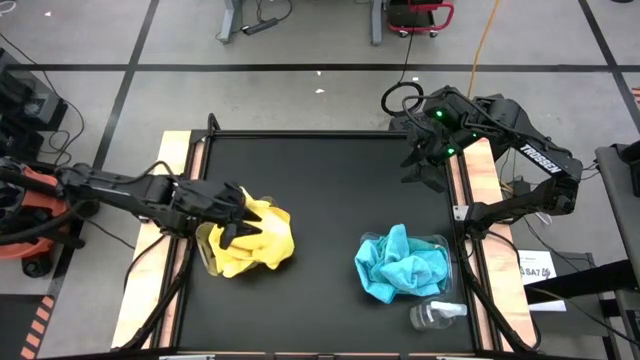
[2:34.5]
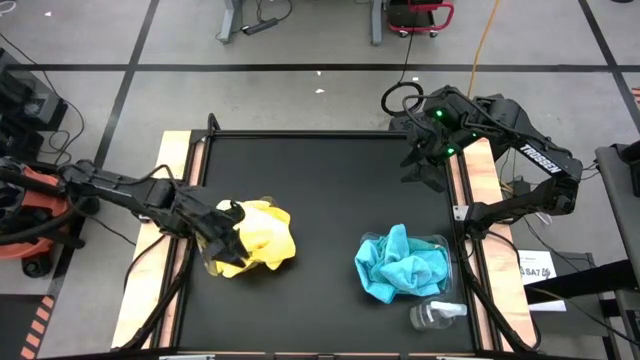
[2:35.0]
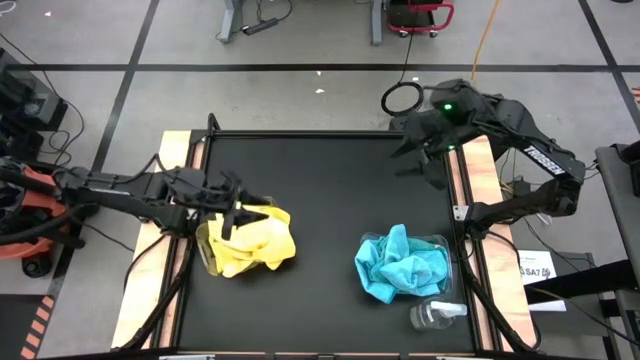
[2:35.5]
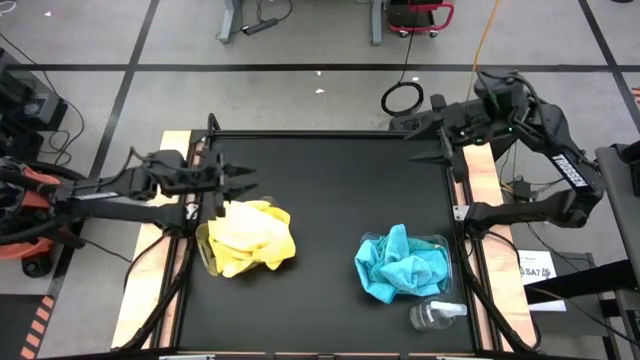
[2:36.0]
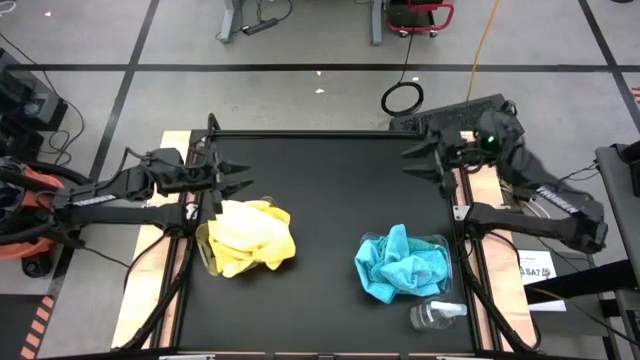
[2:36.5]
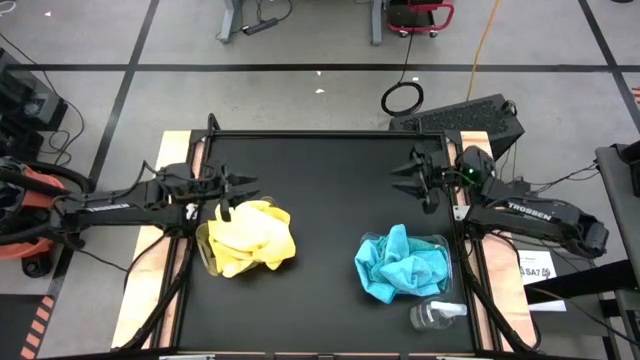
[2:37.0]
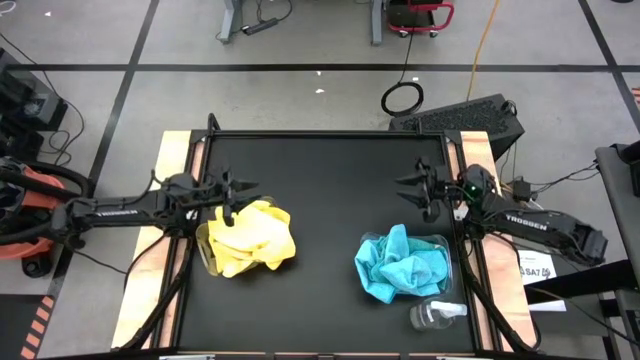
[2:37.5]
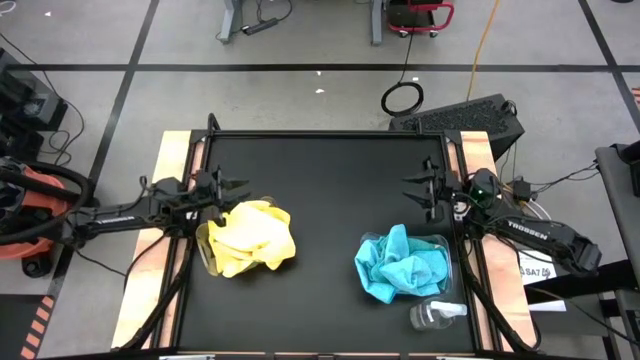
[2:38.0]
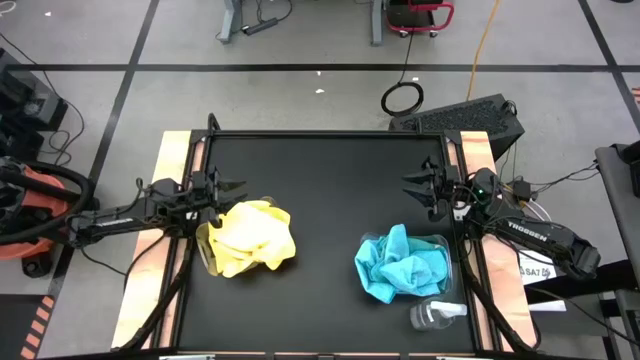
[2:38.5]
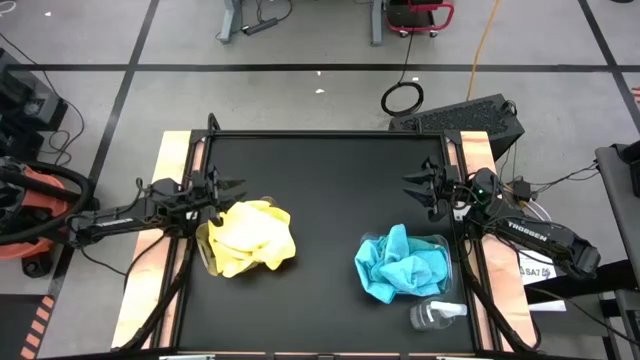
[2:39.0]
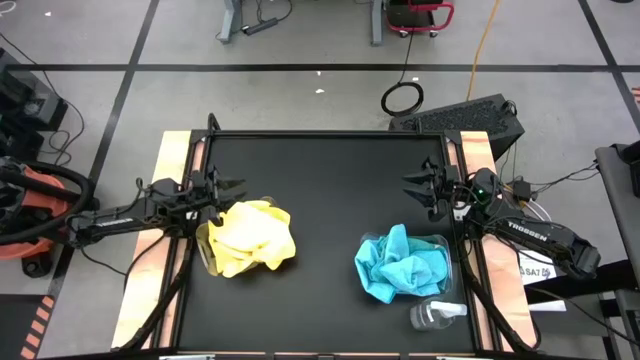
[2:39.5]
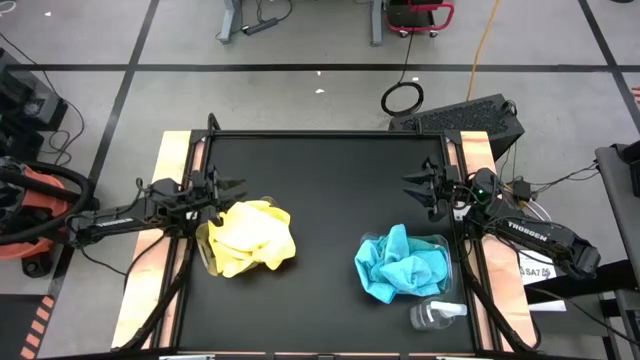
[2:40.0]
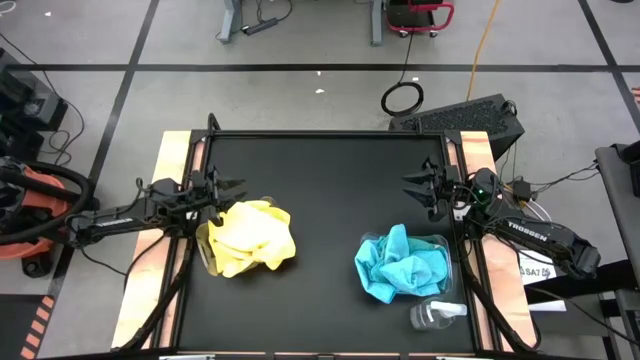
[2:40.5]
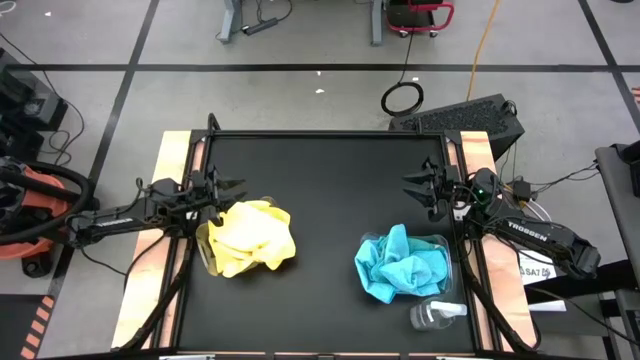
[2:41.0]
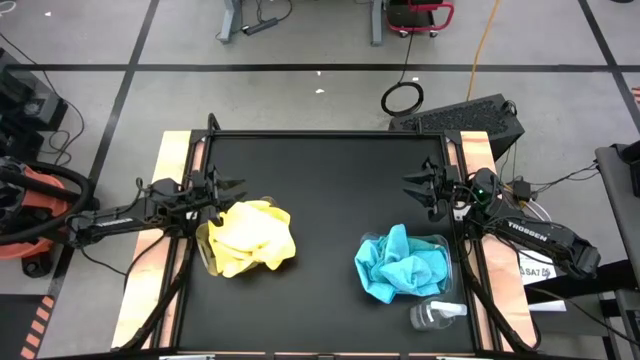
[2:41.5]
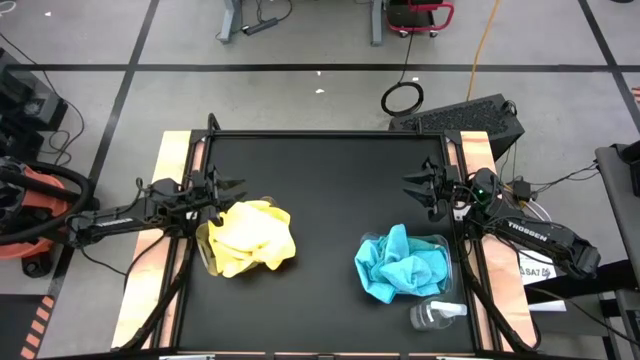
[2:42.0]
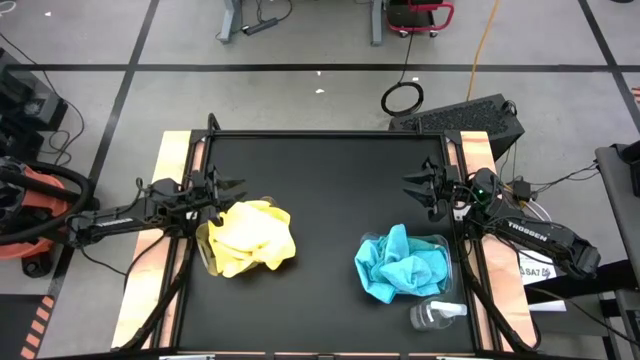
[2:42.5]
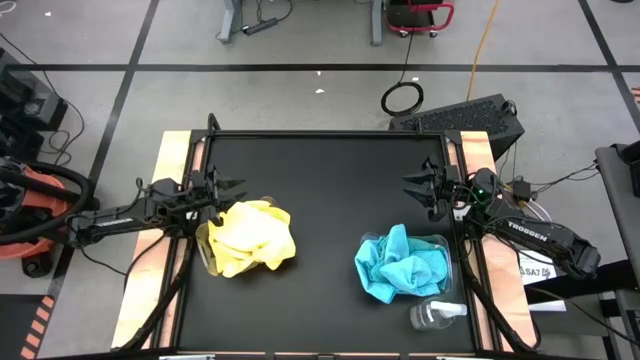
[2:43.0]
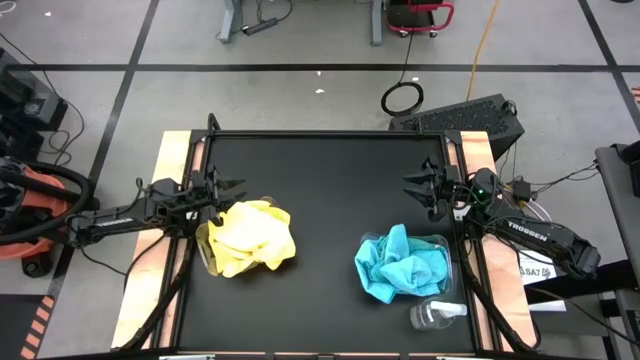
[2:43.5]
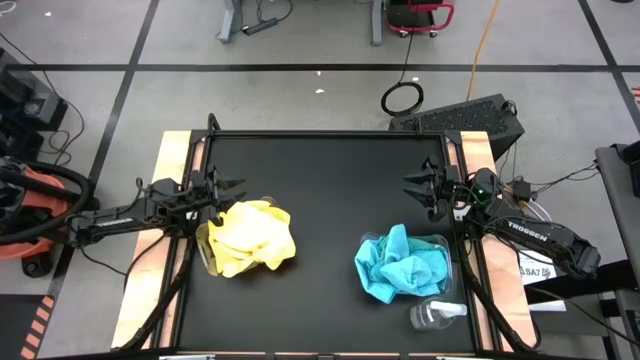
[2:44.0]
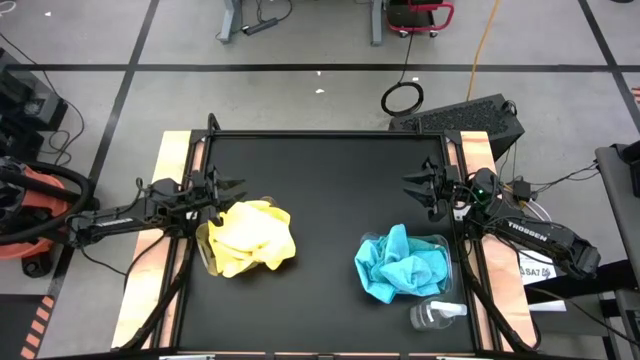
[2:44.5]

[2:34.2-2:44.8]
Task: Sort microfiber towel by color & place in baskets
Return to Home Position

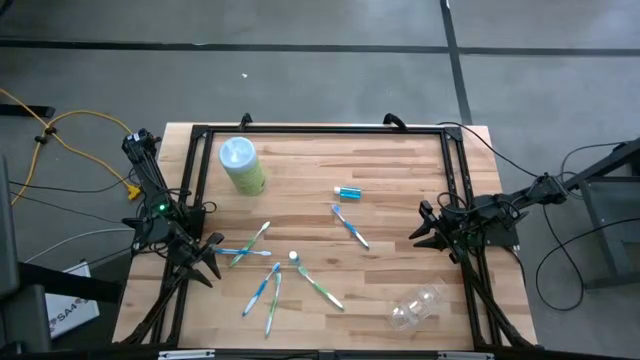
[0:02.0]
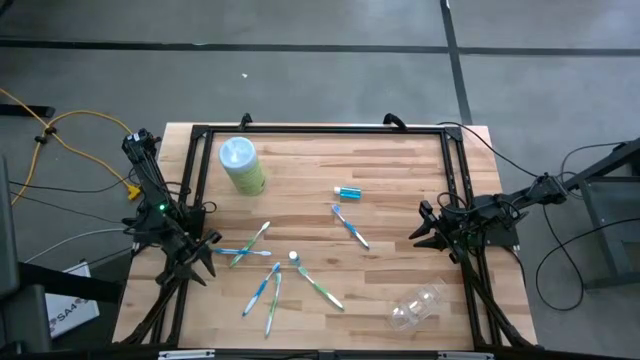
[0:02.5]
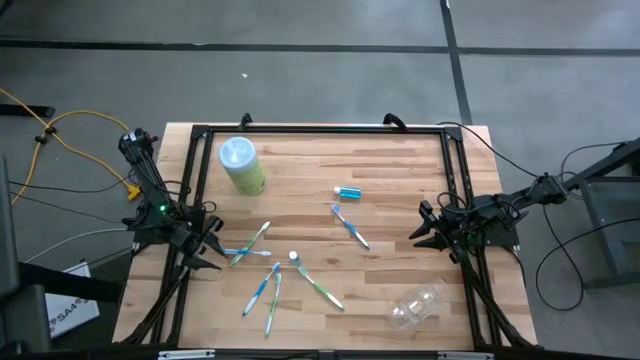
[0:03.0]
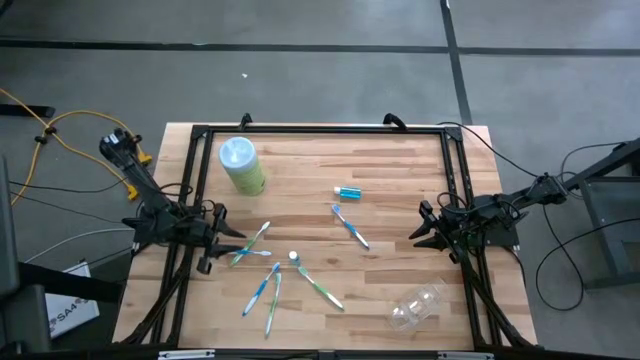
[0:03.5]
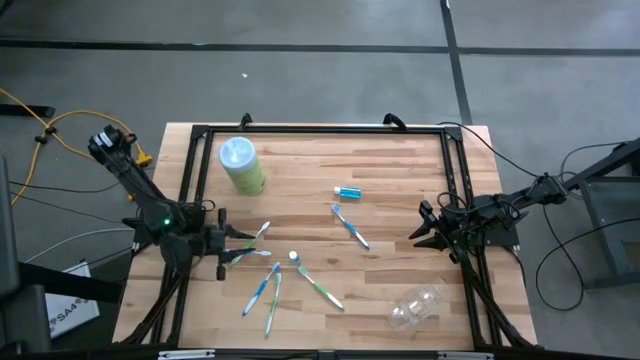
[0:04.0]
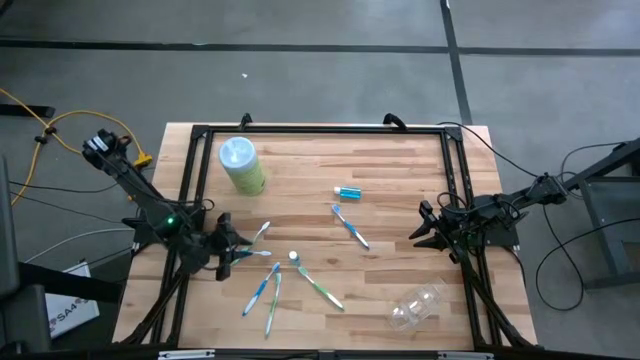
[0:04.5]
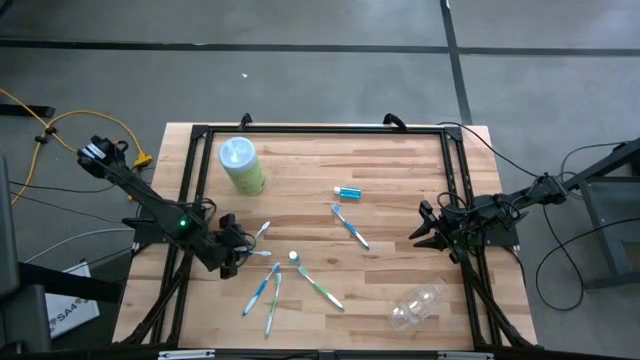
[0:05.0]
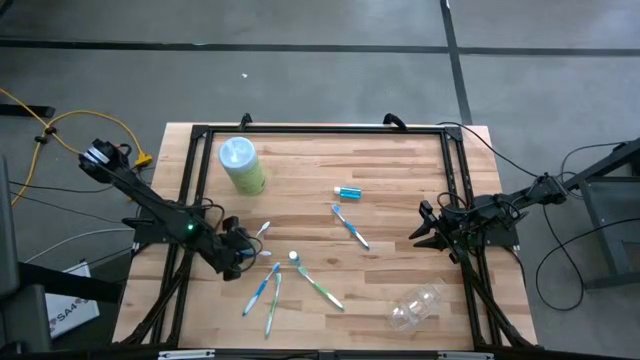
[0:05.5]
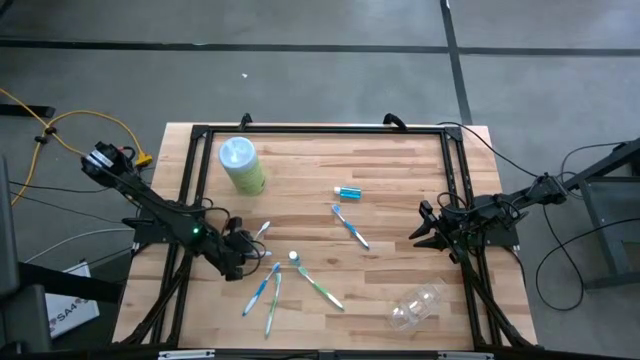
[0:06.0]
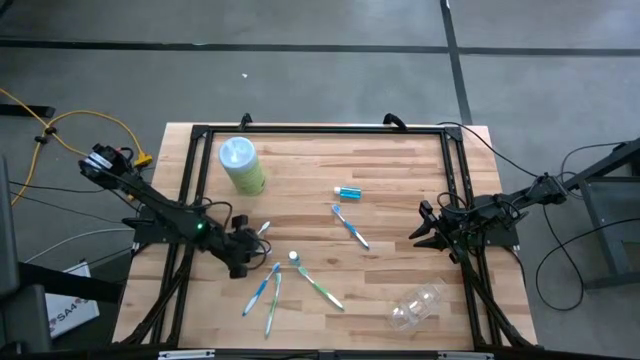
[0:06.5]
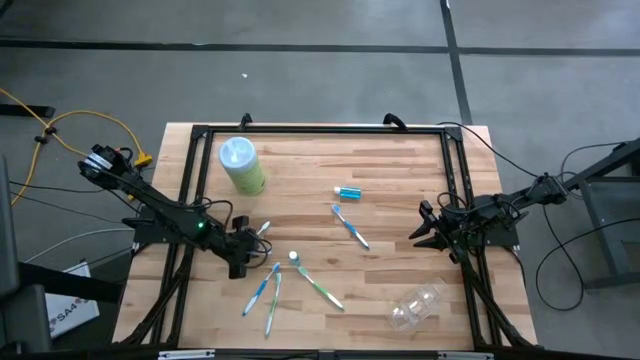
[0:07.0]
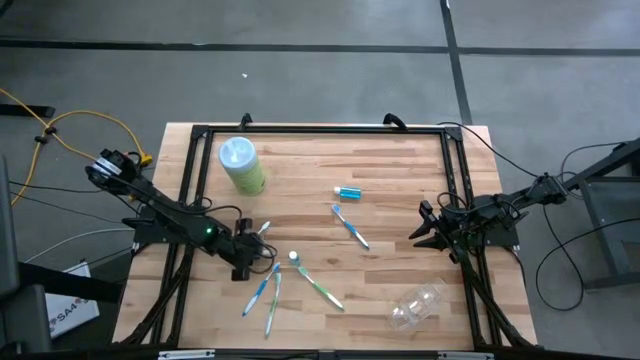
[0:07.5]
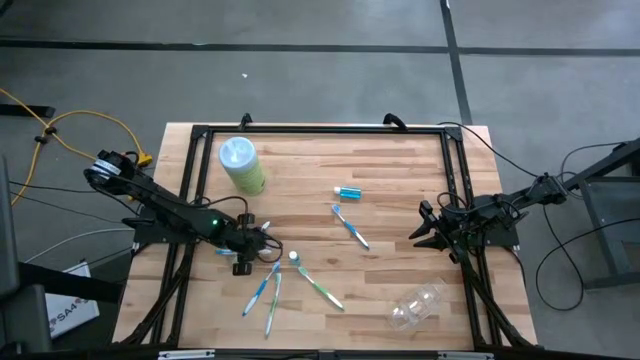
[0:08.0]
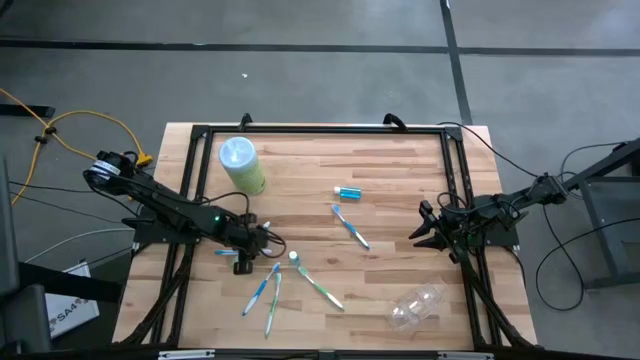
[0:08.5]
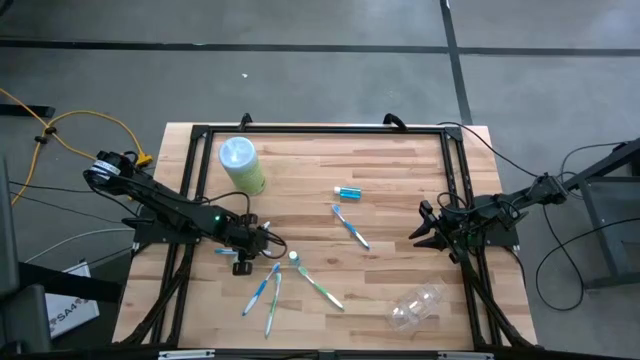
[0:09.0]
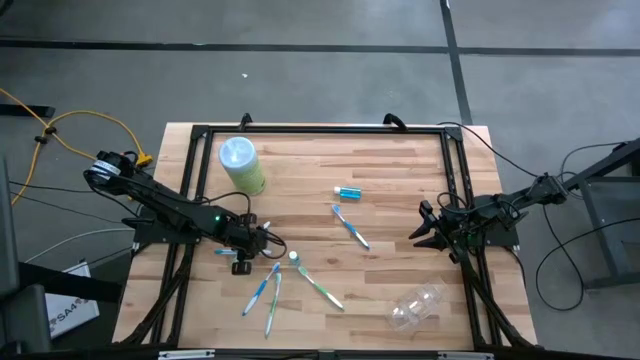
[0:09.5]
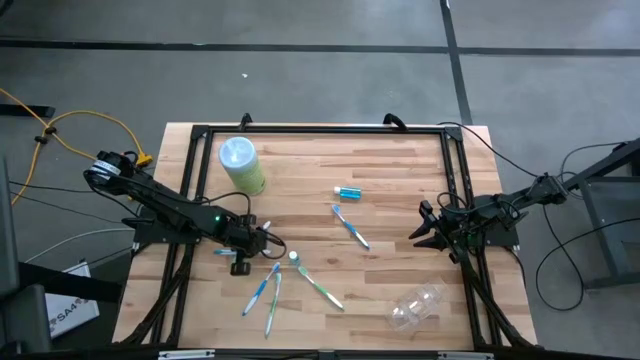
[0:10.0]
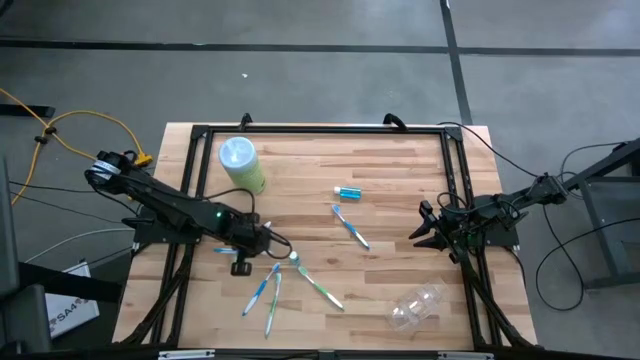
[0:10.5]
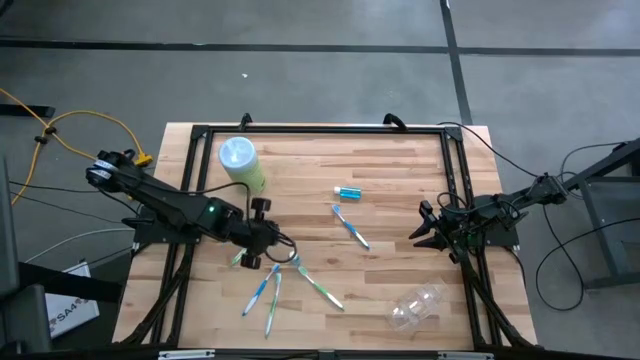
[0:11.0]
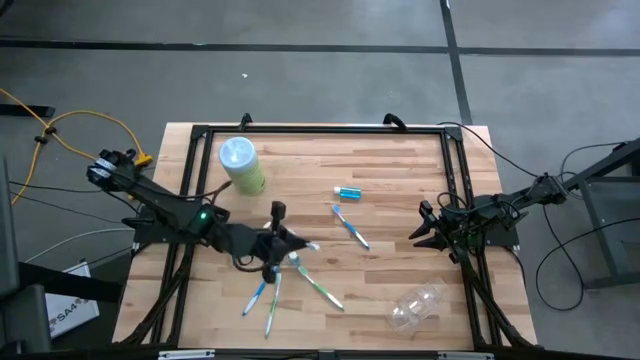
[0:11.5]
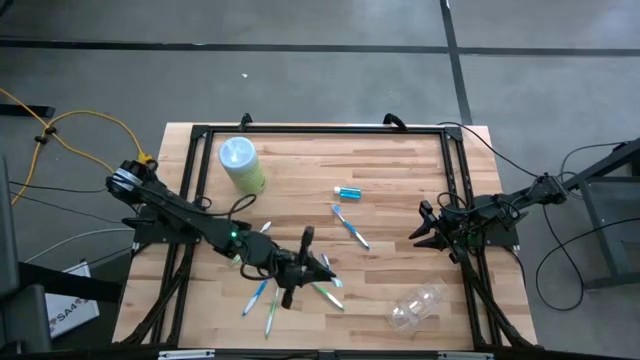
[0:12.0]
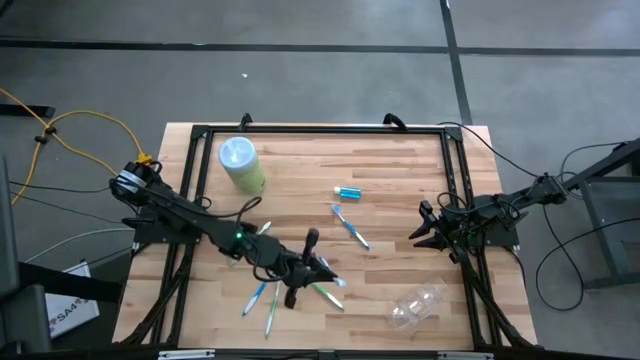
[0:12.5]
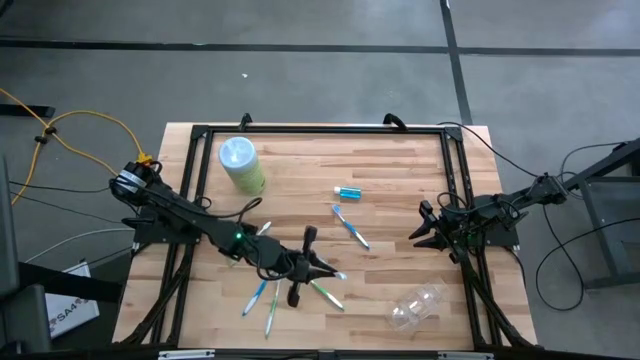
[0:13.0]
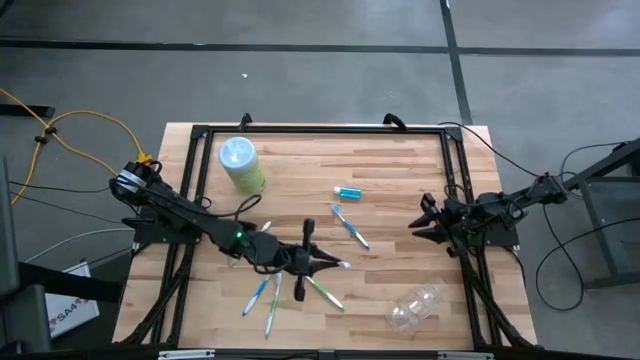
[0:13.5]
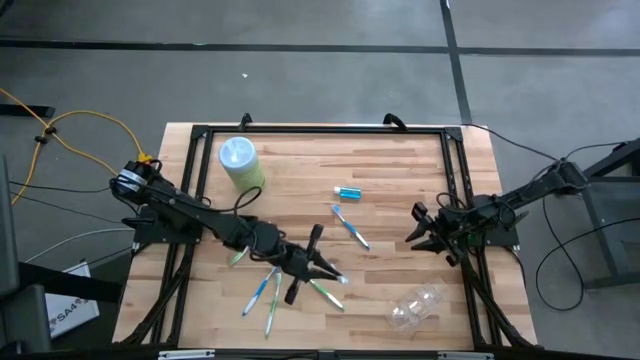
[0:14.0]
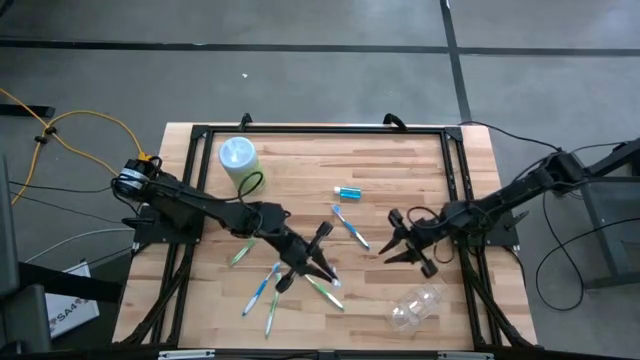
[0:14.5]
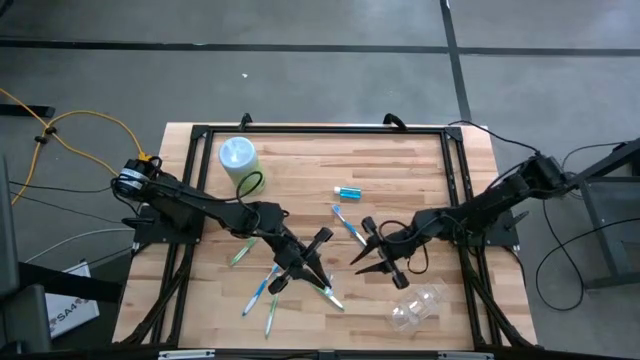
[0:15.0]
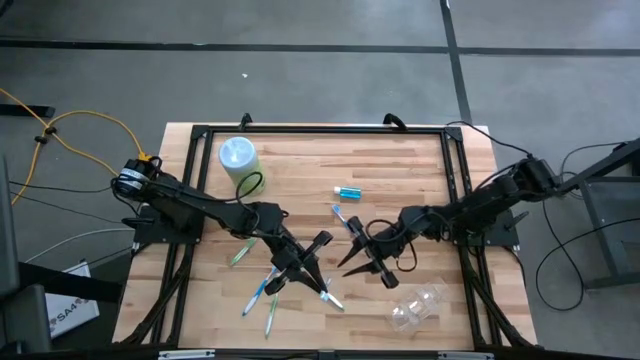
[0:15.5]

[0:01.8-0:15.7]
Task: Pick & Place toothbrushing station
Put the left blue toothbrush into the right section of the transparent organizer
